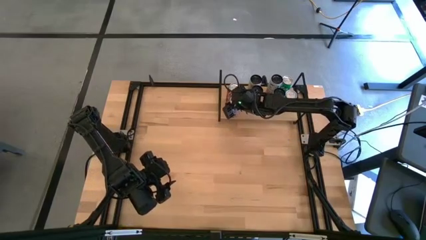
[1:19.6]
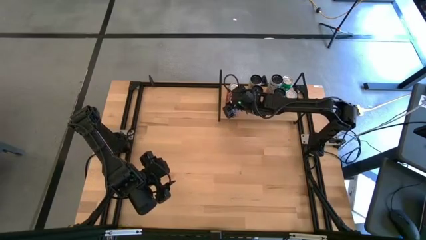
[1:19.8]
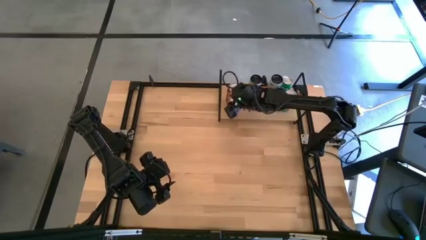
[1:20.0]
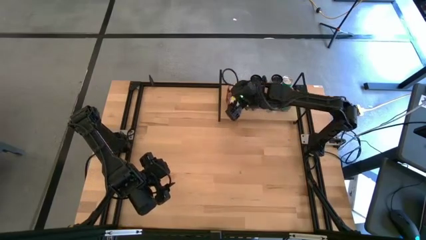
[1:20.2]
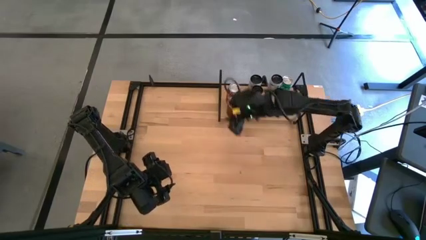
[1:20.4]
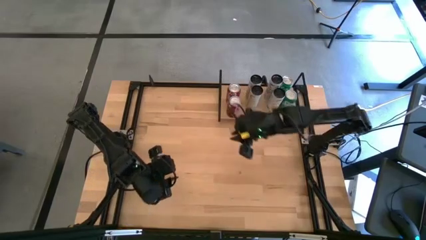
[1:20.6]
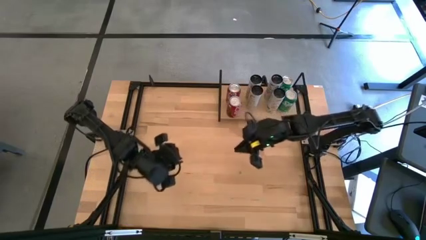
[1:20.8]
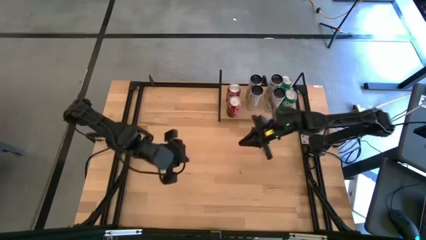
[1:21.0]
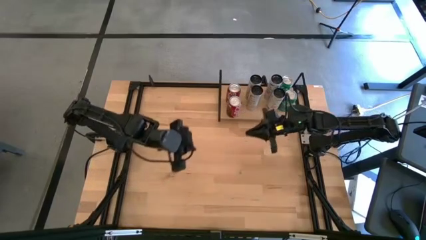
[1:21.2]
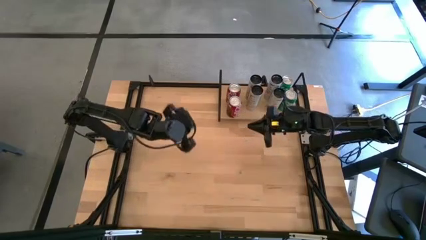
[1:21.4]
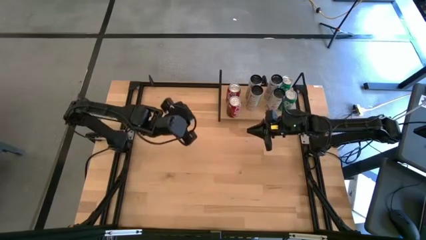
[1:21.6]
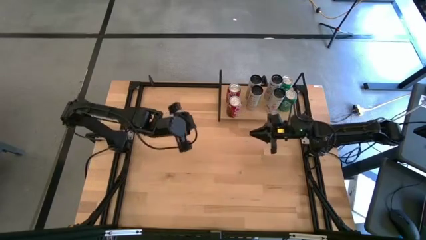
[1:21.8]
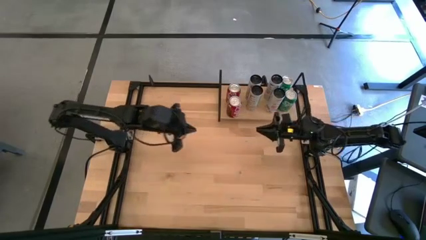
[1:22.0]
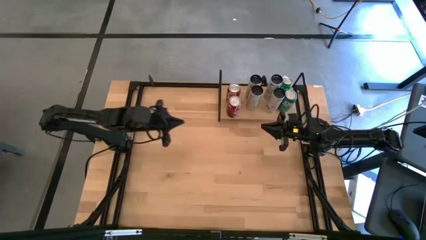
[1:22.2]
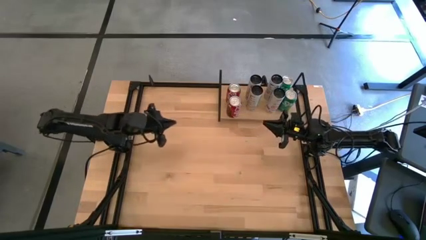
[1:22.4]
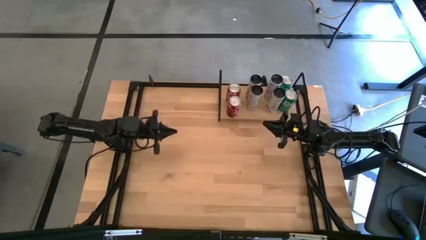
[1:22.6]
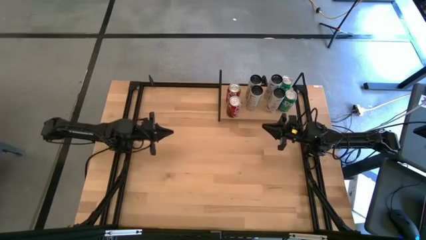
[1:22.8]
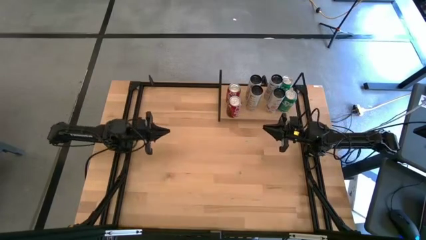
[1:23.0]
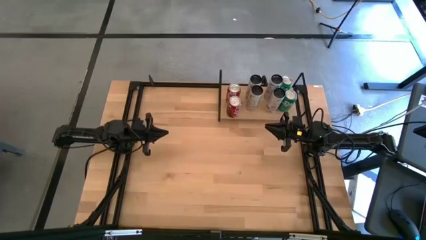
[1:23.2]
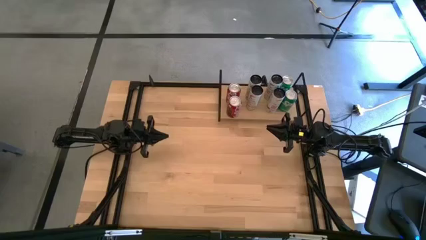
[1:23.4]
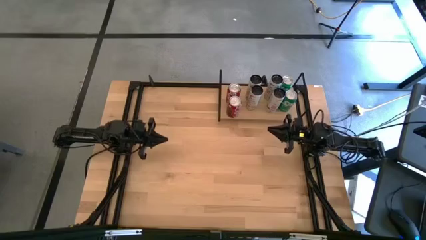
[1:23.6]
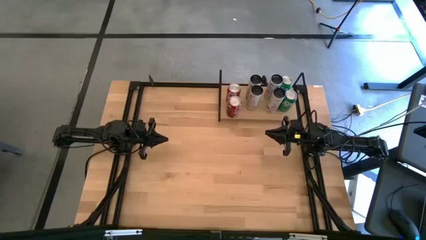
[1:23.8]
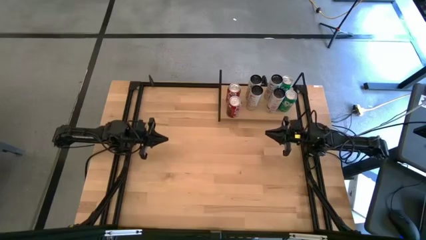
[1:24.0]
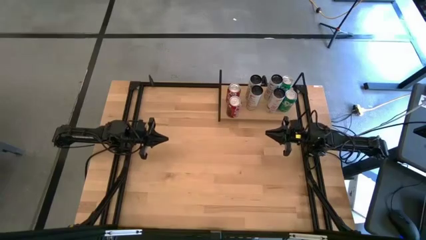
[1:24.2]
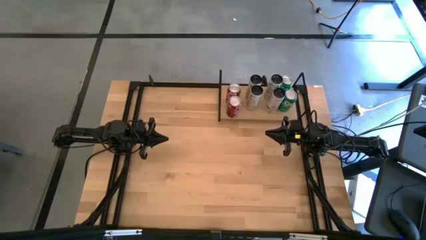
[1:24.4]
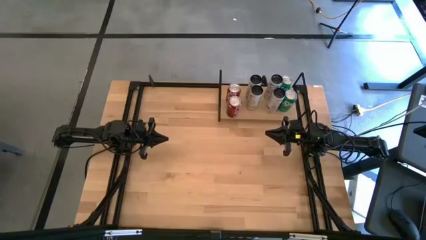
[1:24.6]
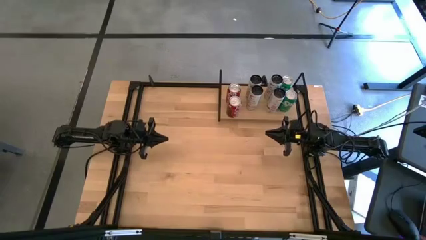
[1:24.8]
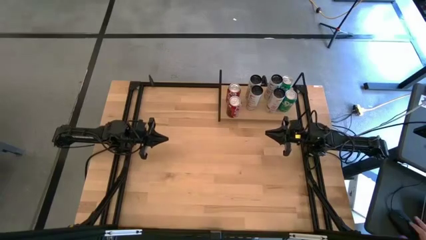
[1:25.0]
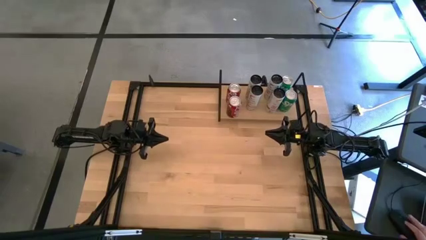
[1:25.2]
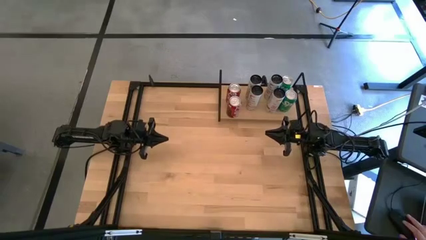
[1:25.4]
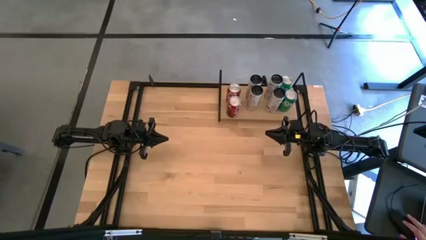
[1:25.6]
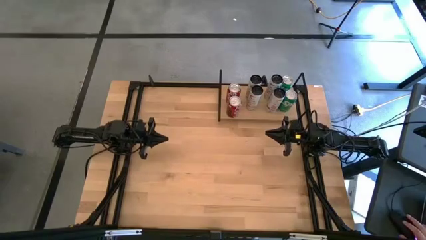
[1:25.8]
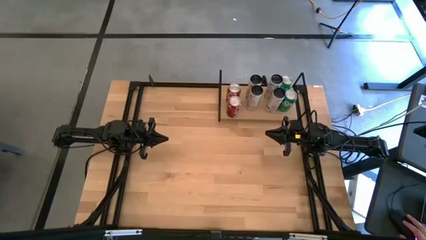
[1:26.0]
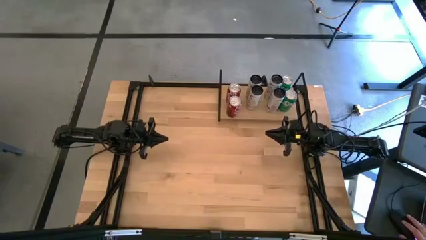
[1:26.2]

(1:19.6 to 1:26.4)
Task: Place canned beverage on shelf
Return to Home Position

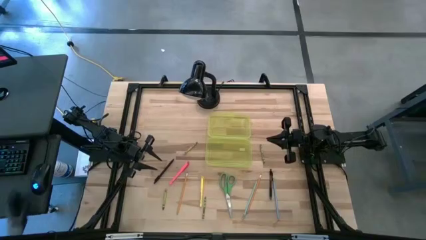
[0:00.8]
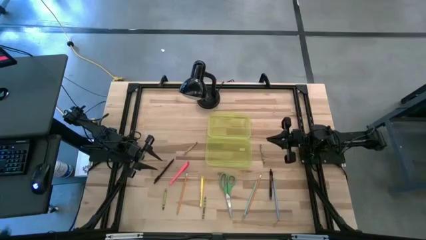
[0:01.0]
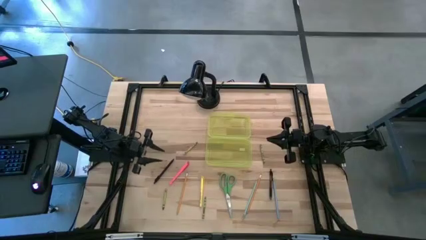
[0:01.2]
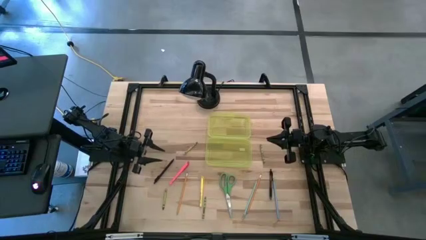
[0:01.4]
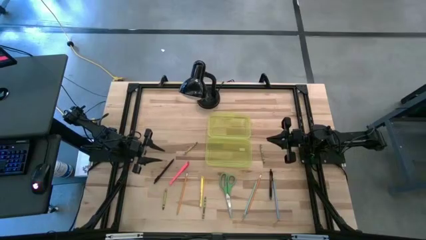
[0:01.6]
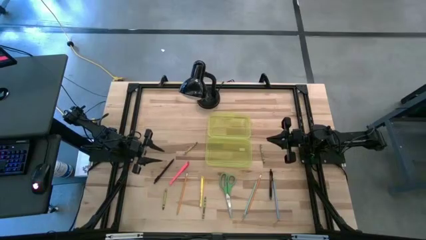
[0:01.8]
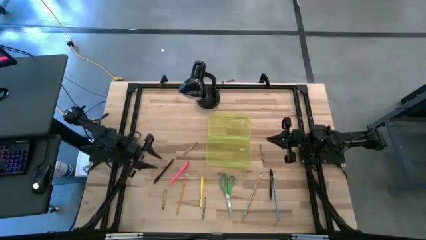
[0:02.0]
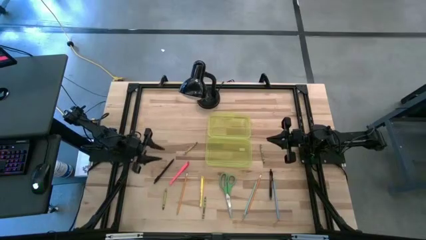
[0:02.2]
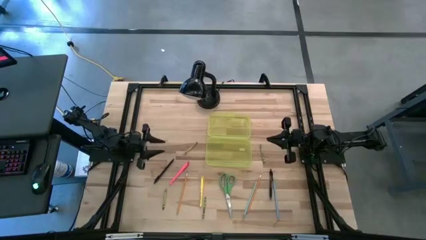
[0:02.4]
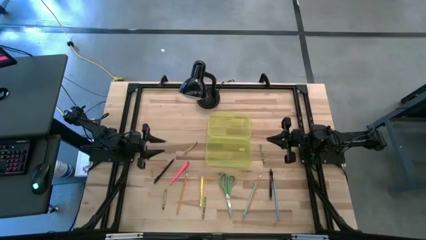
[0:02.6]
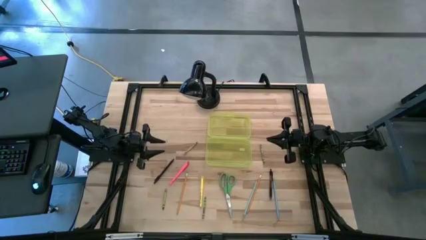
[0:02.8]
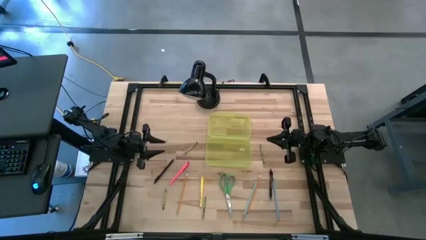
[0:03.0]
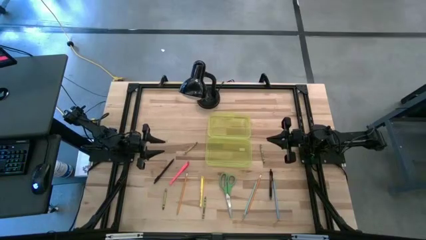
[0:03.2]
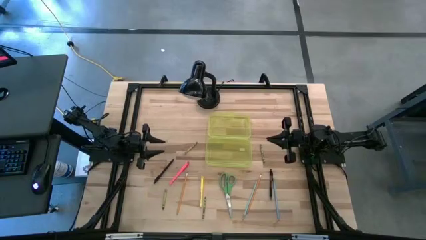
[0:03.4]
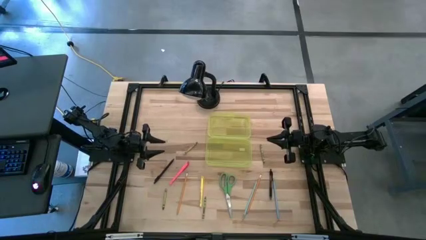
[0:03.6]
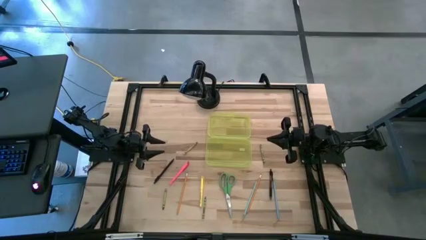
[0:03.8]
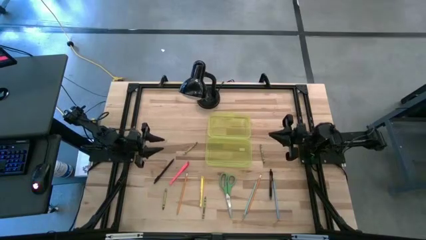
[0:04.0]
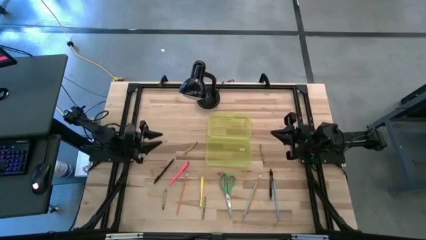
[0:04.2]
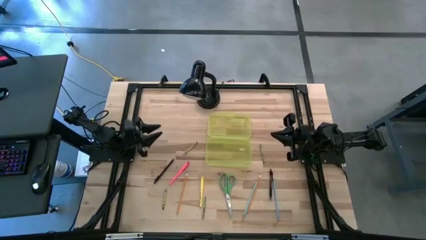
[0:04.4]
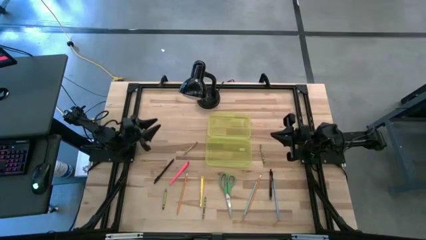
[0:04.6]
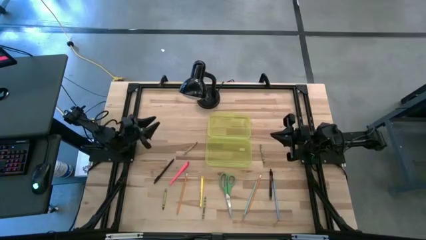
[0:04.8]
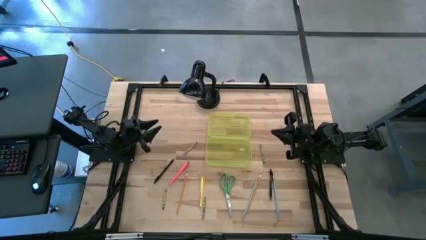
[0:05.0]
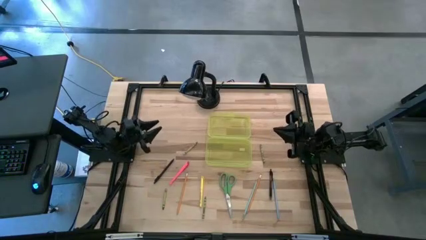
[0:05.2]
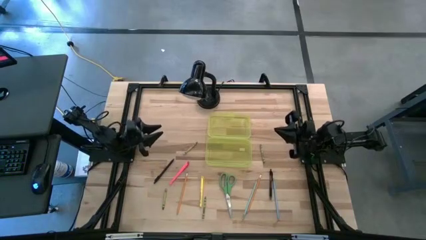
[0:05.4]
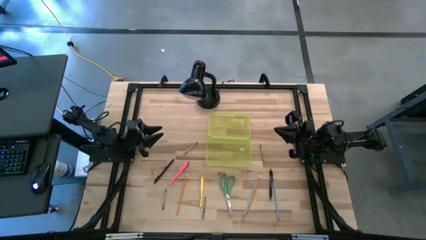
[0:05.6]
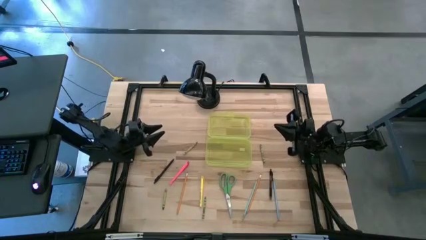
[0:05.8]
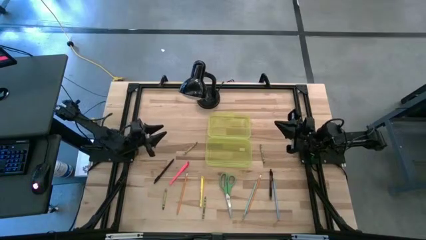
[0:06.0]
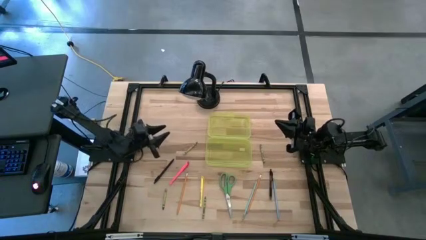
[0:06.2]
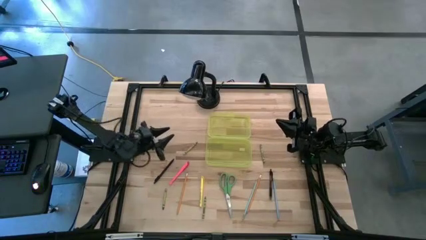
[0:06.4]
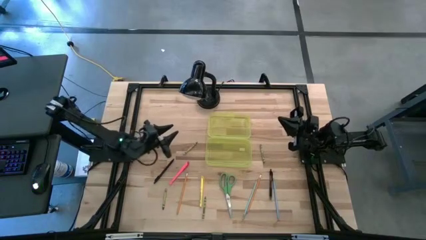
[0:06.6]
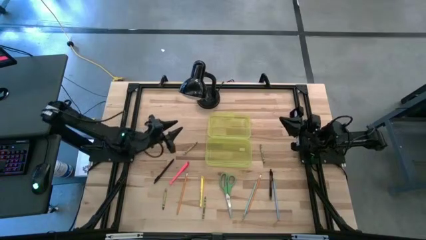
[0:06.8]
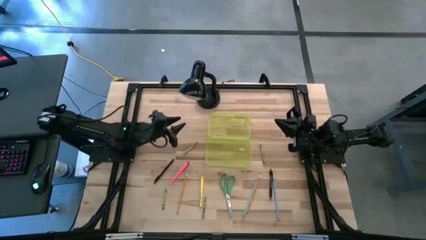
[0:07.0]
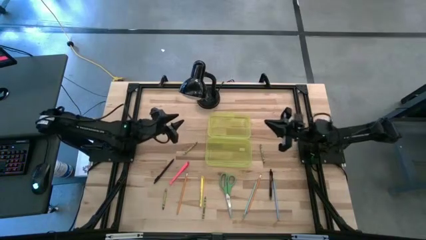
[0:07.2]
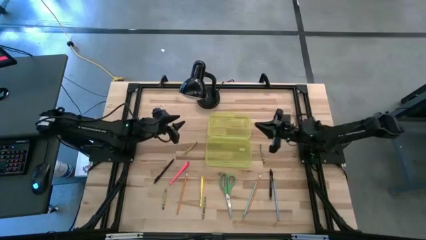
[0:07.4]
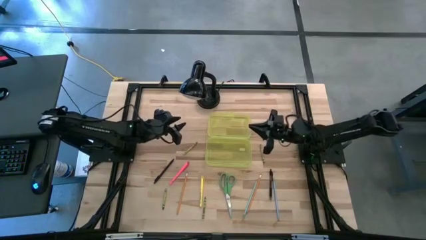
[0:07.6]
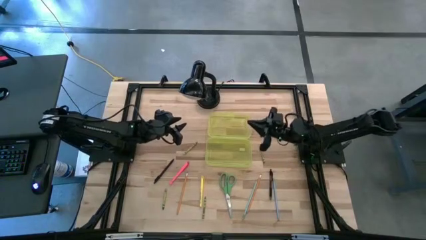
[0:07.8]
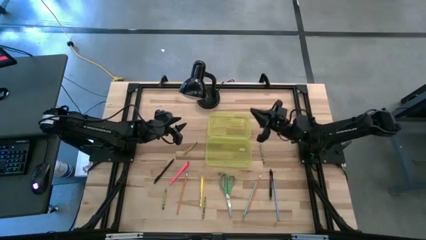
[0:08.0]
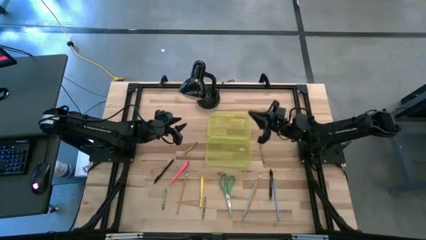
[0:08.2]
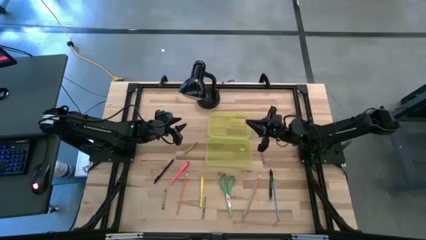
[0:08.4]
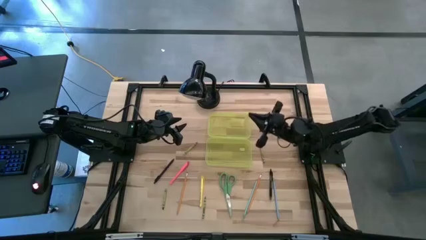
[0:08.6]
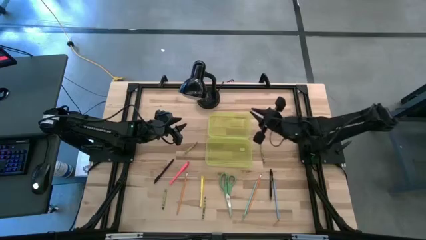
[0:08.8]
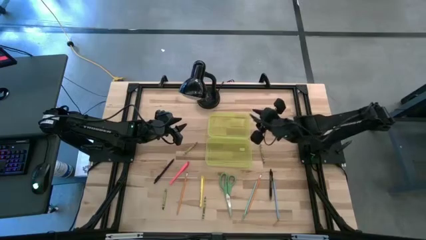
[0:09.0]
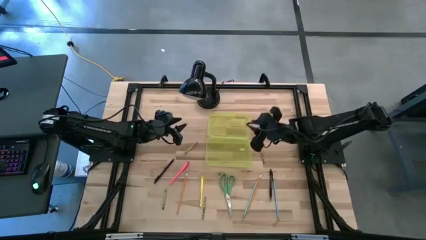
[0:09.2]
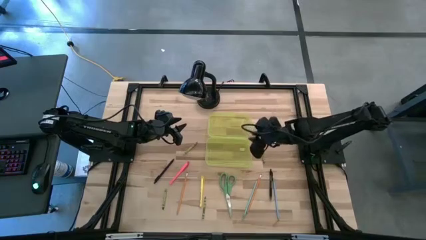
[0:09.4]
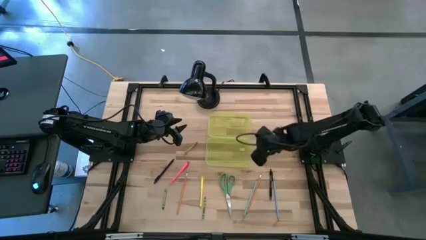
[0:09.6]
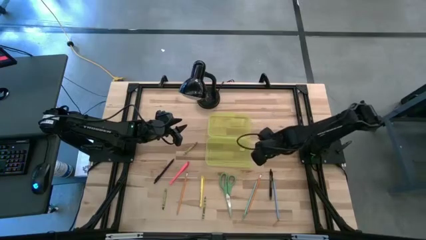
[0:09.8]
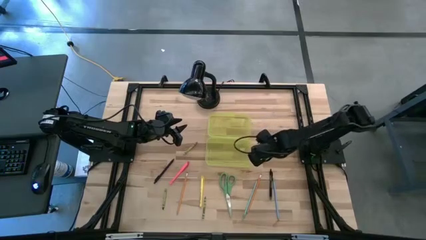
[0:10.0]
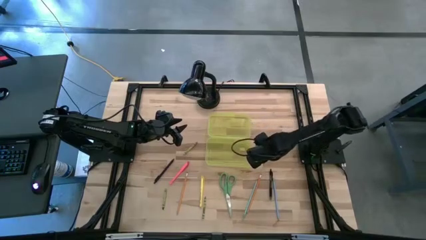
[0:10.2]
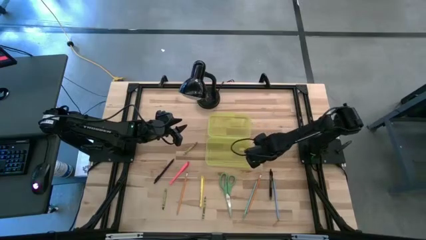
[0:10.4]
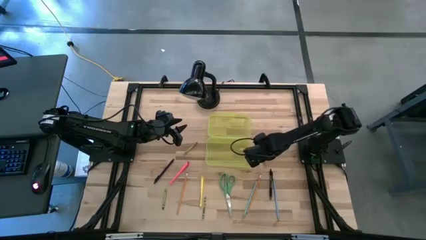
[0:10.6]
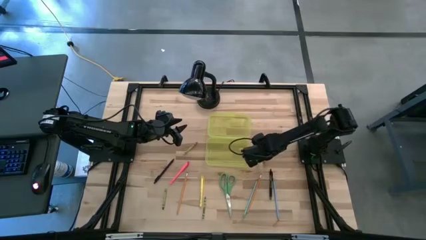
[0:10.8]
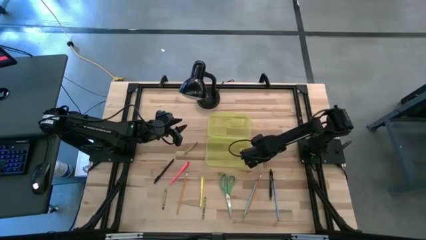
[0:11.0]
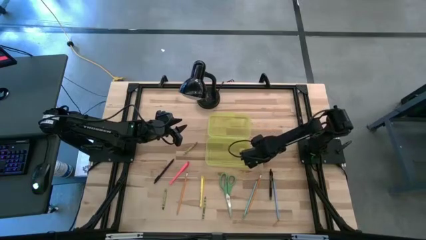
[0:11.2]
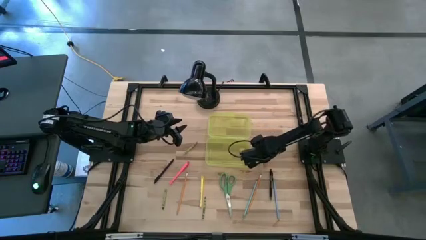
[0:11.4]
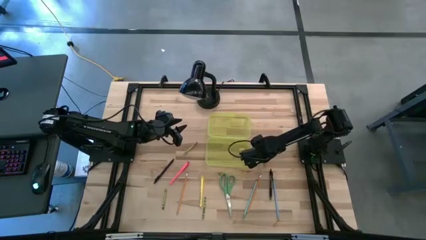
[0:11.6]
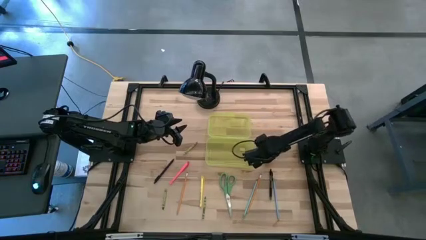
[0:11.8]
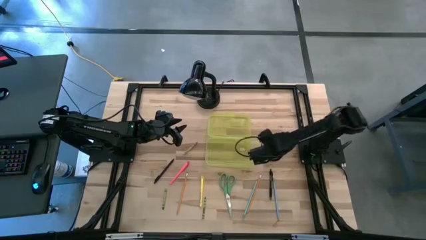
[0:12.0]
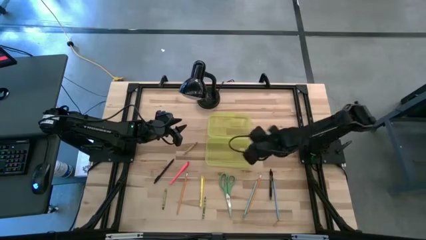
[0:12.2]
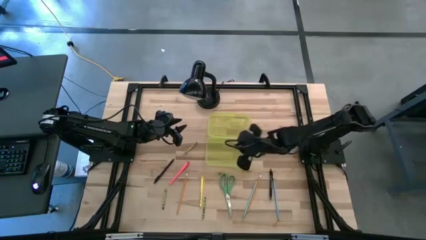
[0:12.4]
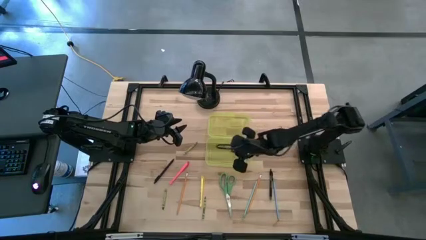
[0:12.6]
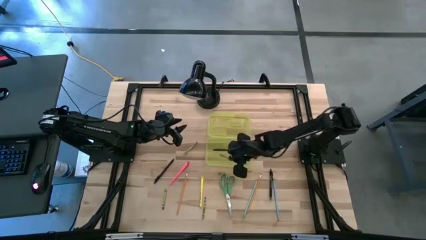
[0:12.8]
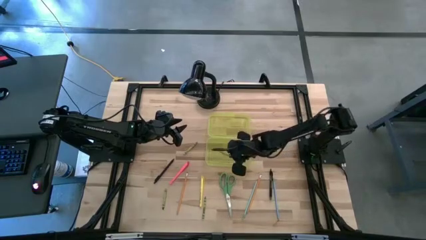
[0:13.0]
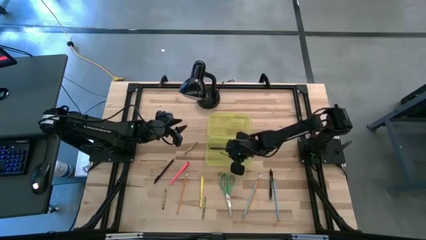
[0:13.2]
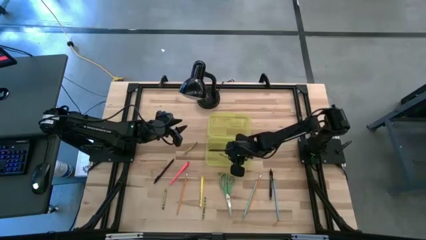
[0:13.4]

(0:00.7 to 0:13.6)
Task: Pick & place school supplies into a supply box
Put the green crayon into the yellow supply box
